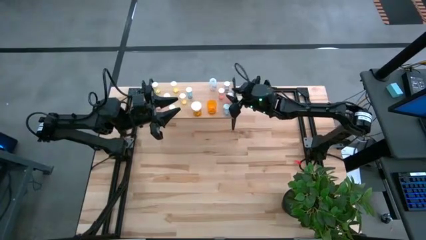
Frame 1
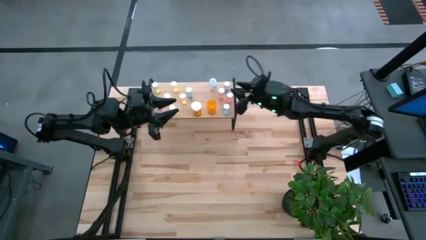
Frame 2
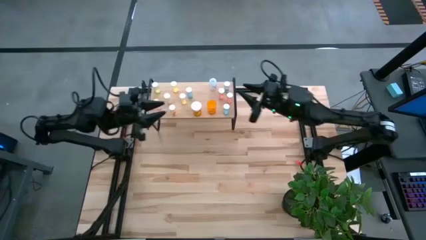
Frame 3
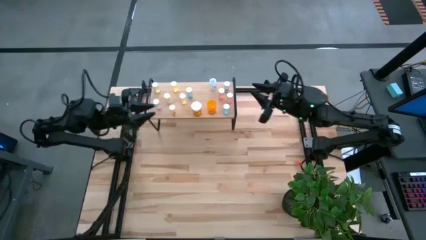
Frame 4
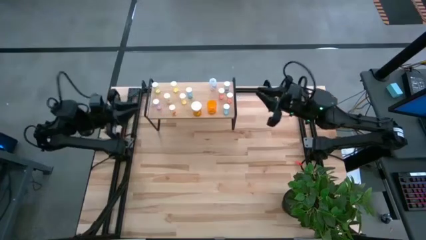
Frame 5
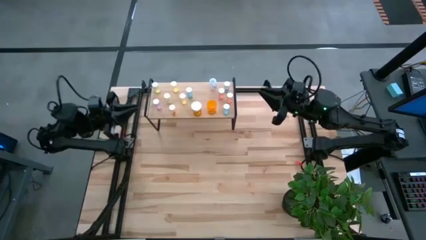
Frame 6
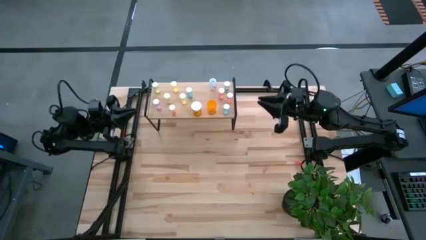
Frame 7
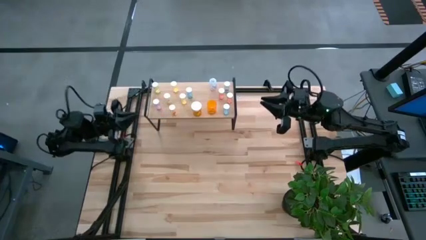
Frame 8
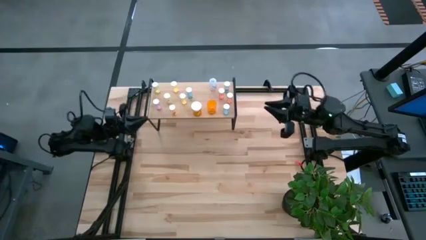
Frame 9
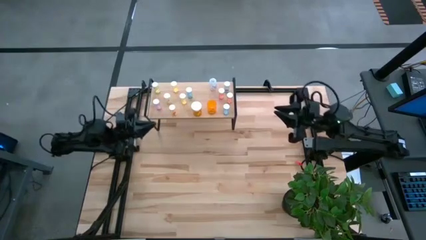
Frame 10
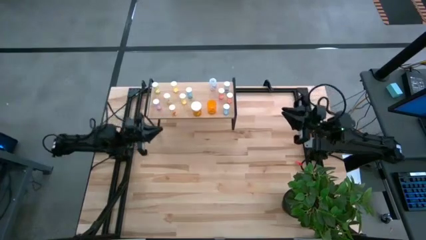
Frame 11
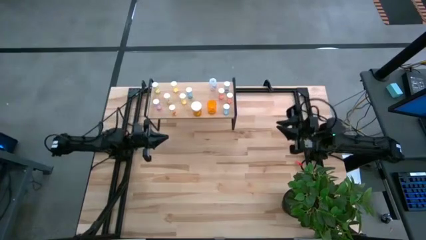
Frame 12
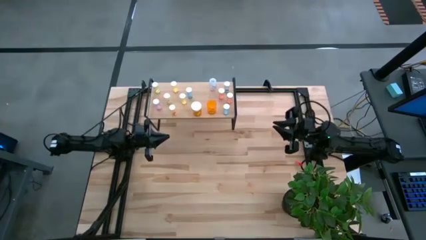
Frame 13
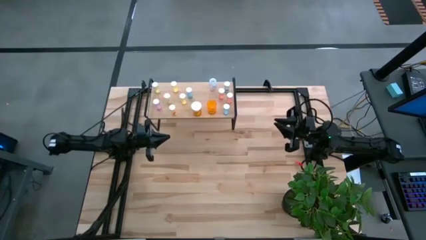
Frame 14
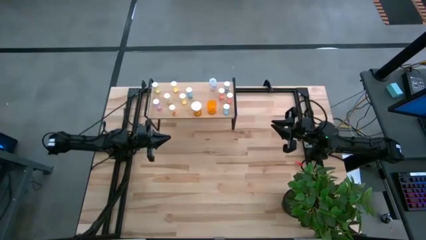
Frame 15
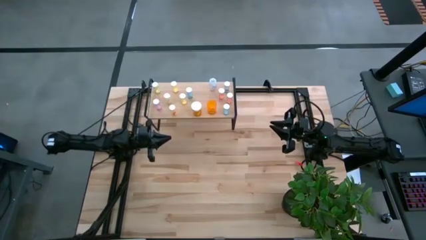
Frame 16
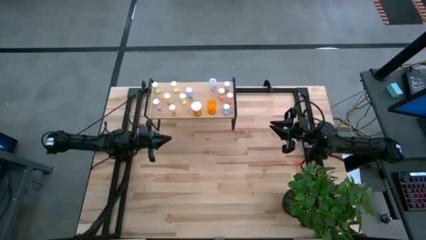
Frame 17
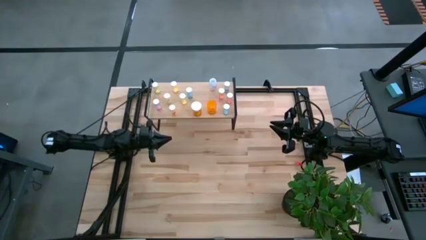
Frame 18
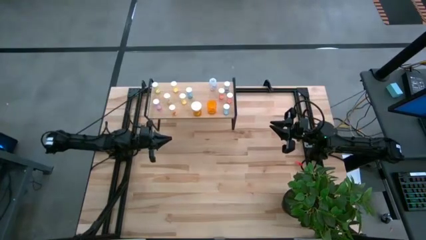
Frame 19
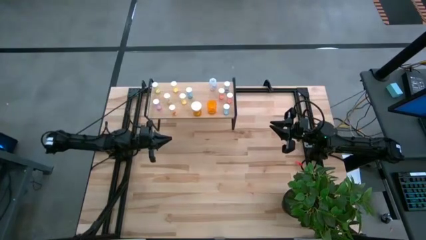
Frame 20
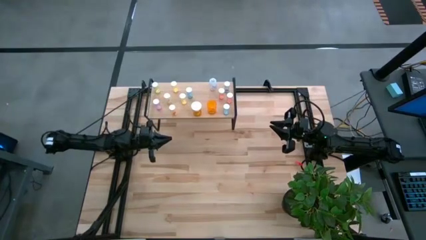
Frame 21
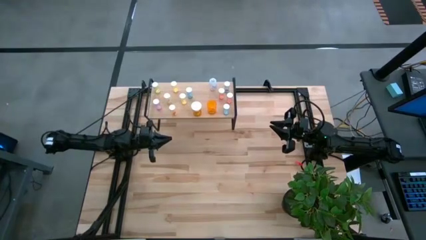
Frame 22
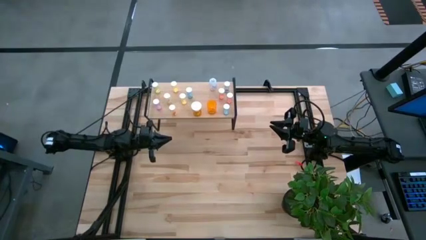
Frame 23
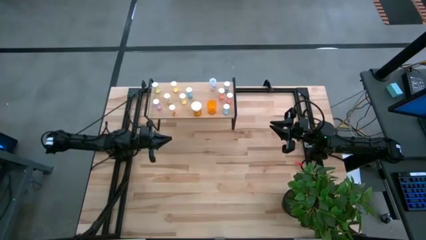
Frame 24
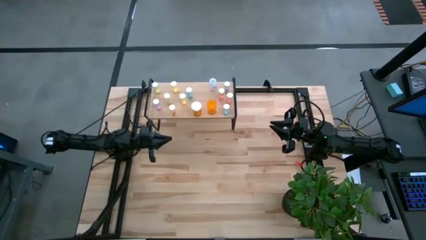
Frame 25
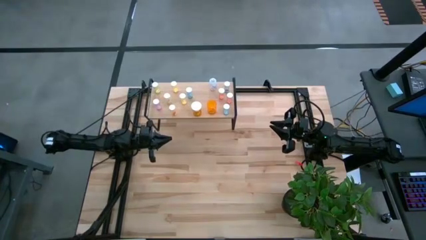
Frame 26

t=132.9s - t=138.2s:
Task: Pick and place medicine bottles onto shelf by color
Return to Home Position

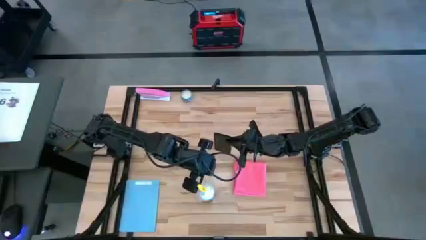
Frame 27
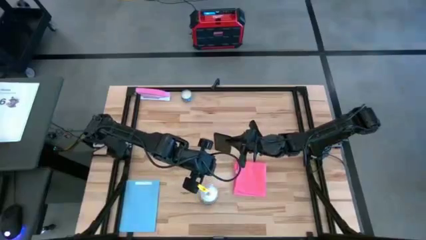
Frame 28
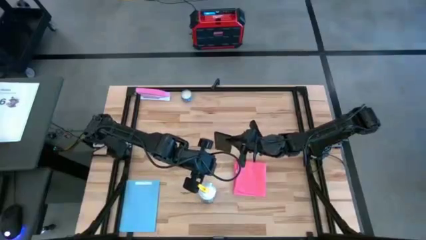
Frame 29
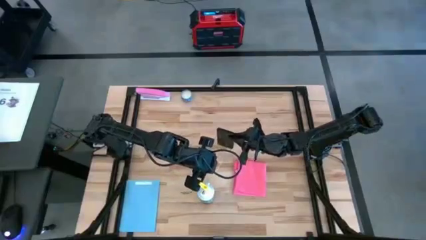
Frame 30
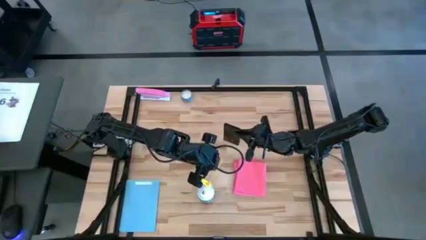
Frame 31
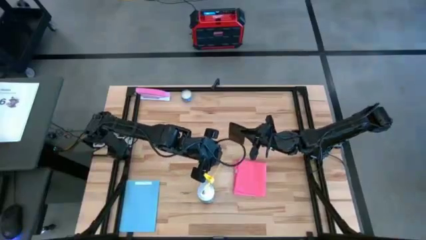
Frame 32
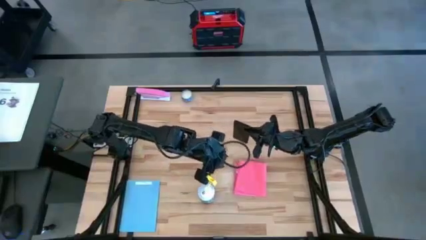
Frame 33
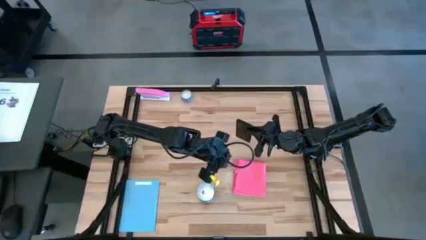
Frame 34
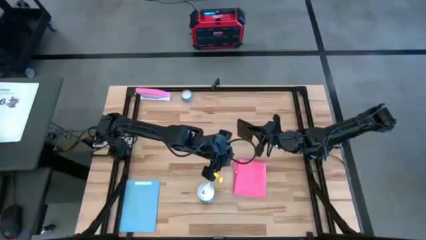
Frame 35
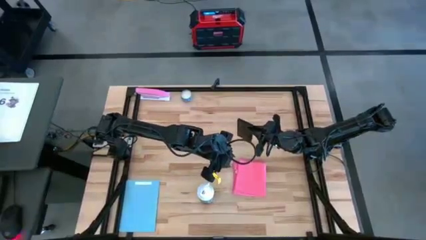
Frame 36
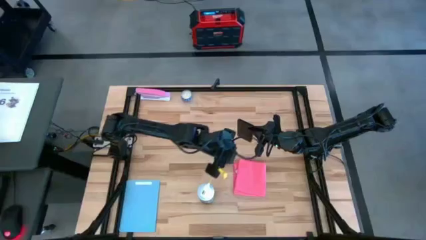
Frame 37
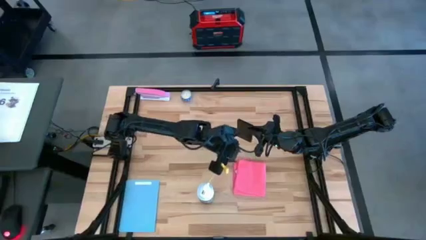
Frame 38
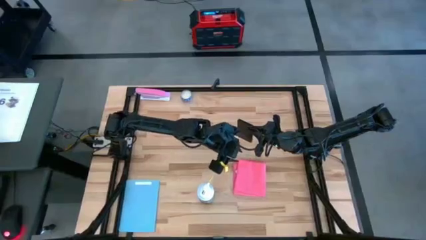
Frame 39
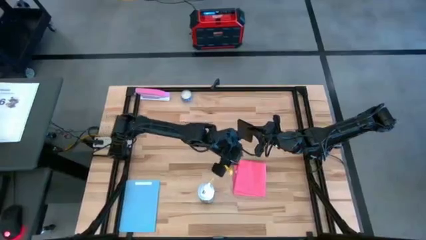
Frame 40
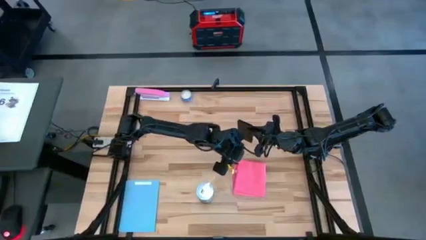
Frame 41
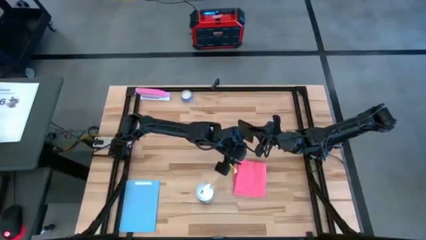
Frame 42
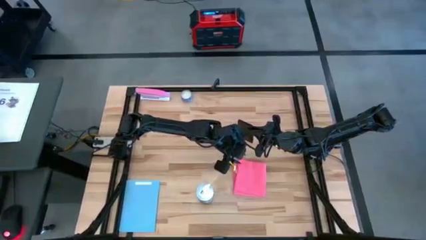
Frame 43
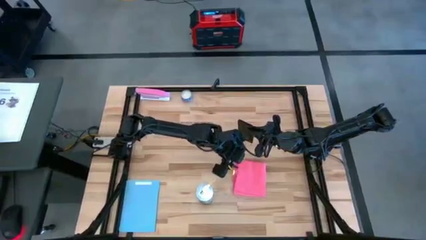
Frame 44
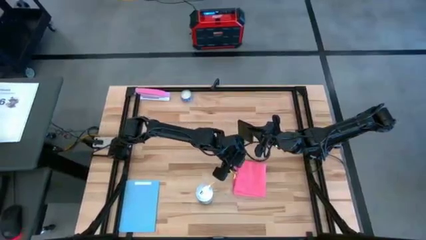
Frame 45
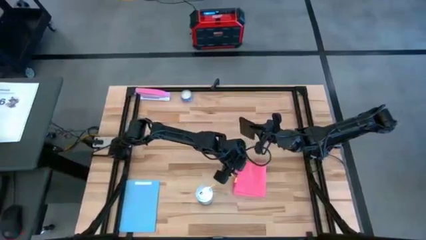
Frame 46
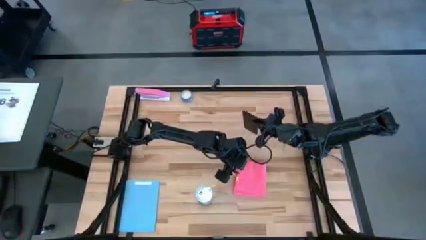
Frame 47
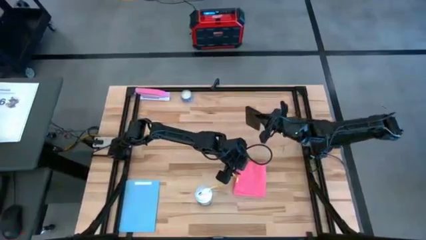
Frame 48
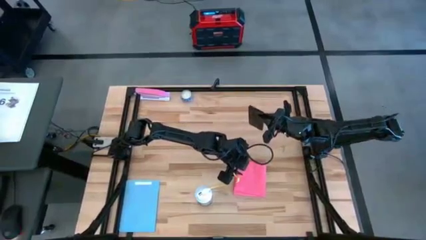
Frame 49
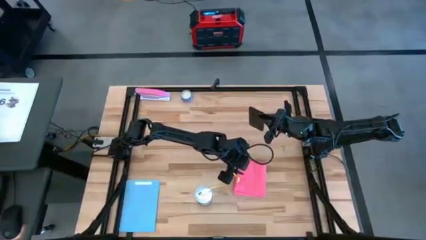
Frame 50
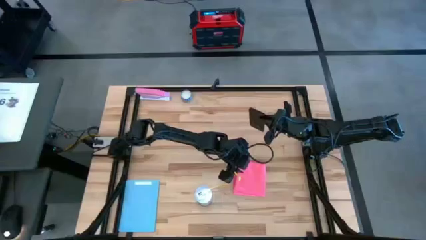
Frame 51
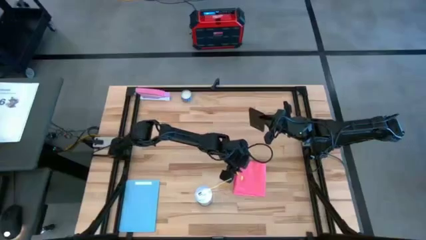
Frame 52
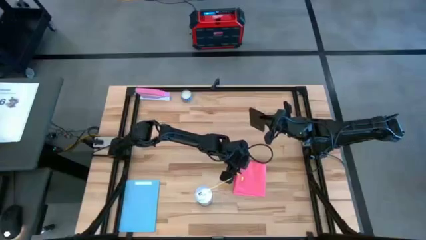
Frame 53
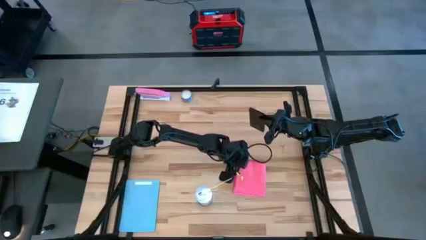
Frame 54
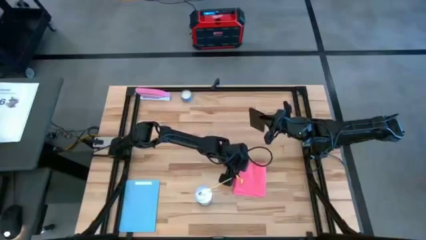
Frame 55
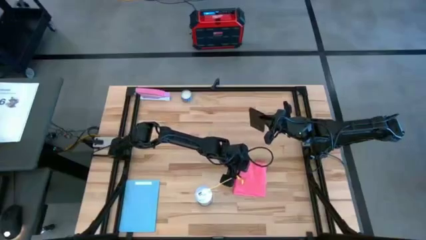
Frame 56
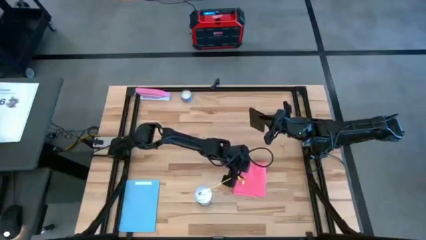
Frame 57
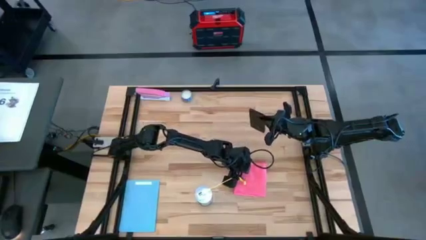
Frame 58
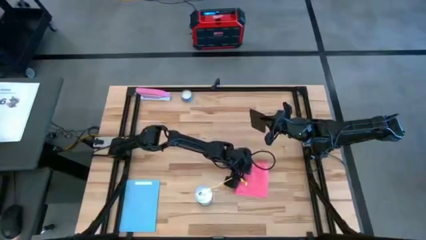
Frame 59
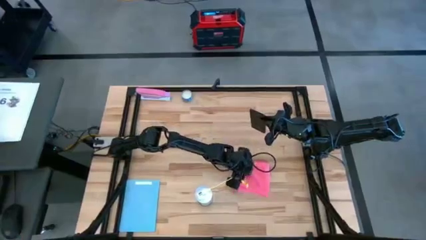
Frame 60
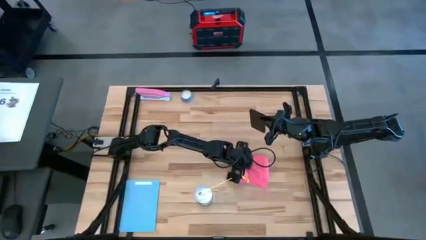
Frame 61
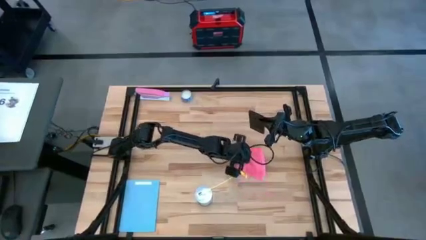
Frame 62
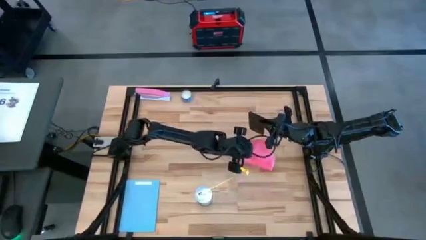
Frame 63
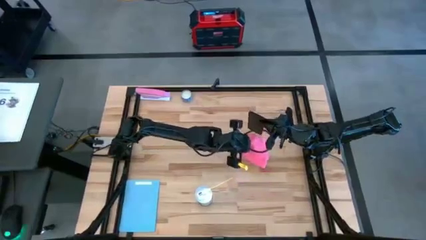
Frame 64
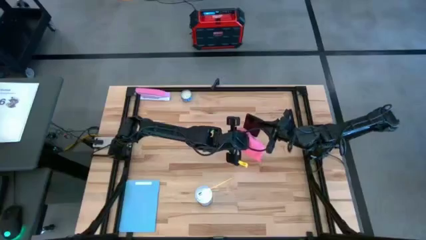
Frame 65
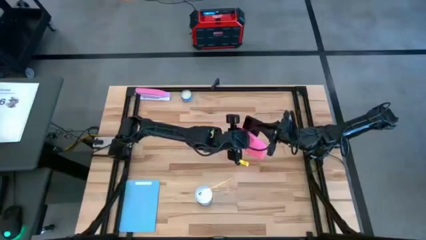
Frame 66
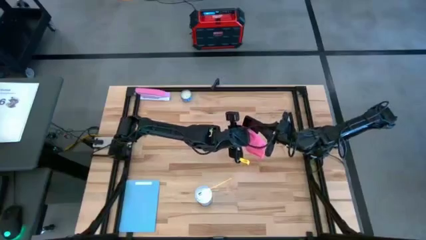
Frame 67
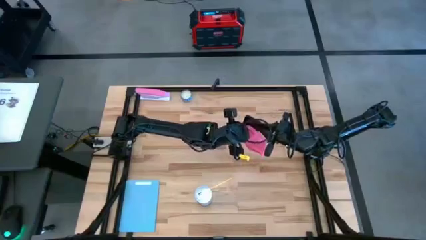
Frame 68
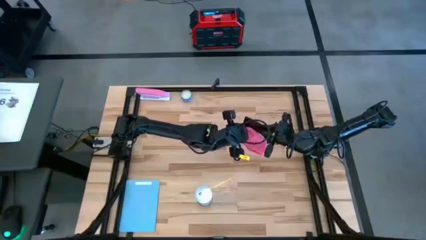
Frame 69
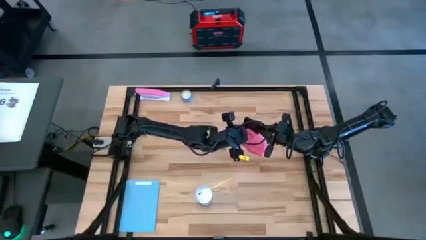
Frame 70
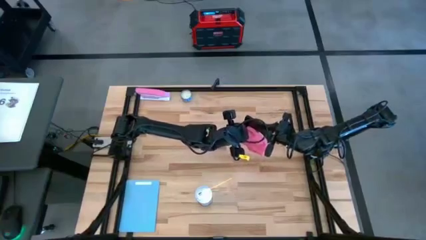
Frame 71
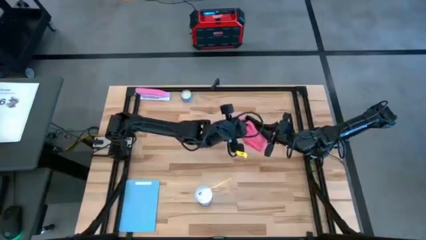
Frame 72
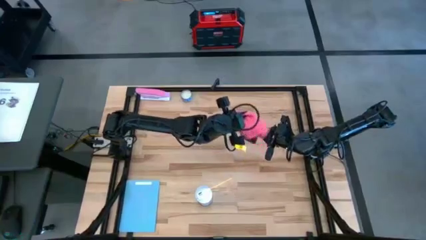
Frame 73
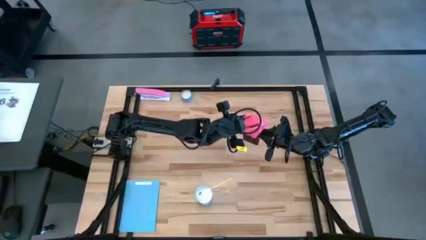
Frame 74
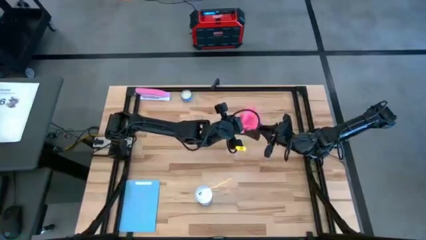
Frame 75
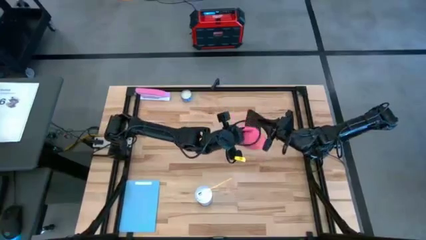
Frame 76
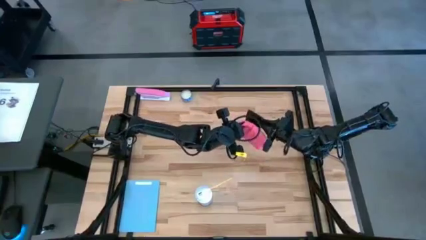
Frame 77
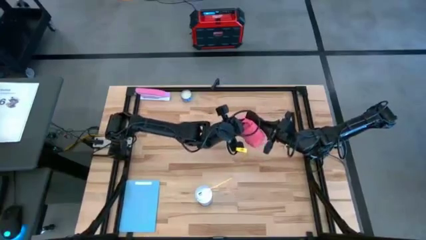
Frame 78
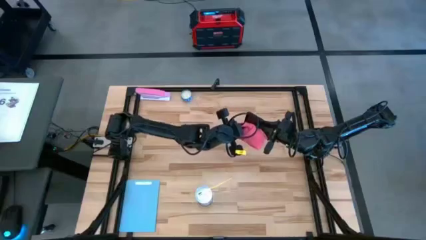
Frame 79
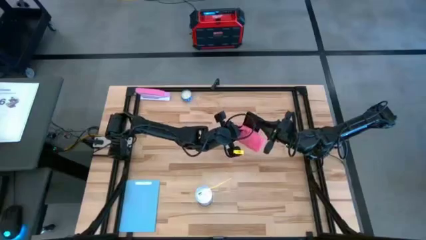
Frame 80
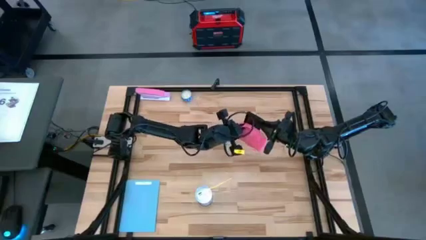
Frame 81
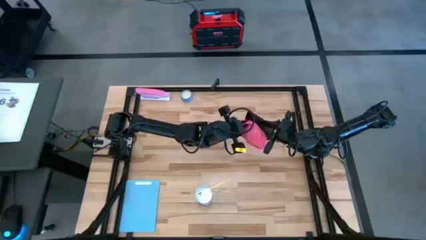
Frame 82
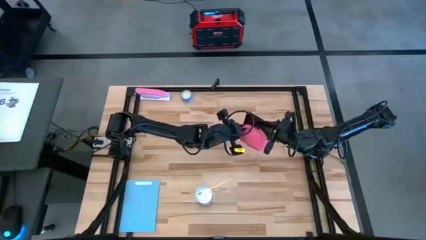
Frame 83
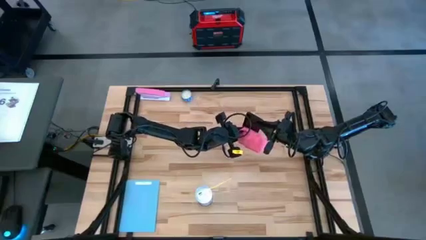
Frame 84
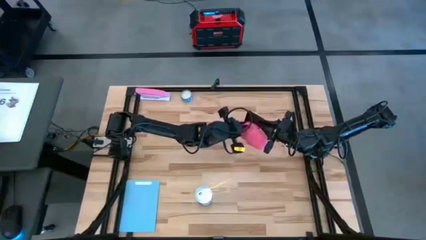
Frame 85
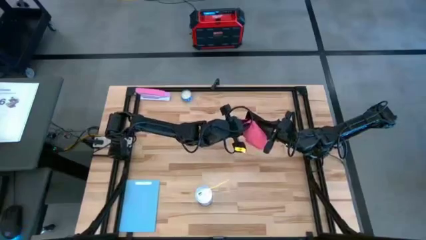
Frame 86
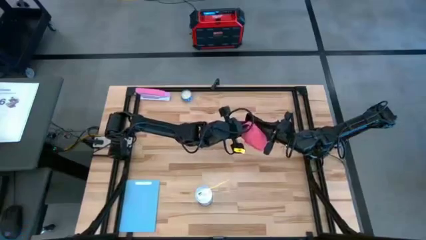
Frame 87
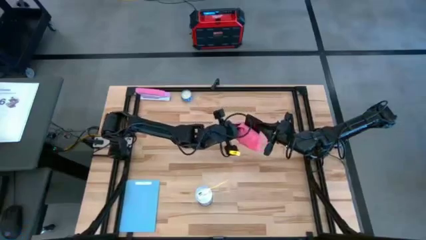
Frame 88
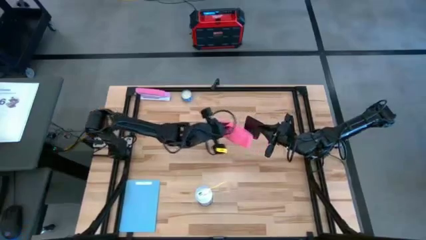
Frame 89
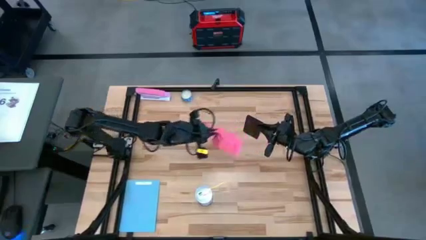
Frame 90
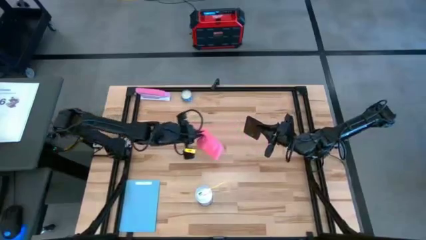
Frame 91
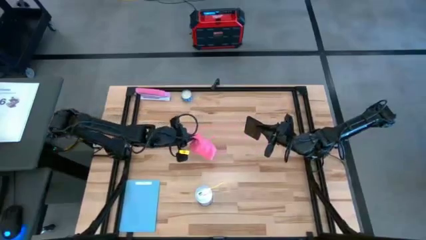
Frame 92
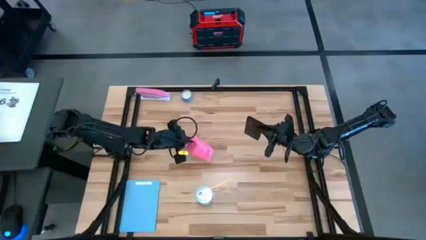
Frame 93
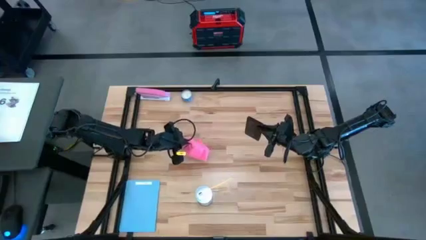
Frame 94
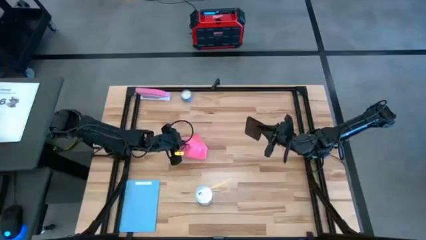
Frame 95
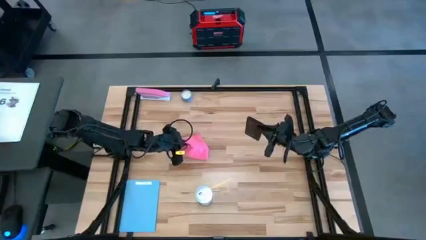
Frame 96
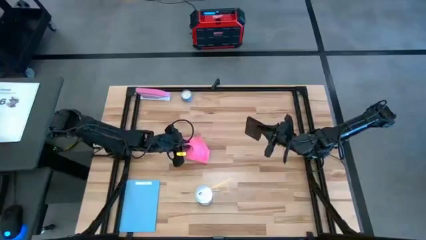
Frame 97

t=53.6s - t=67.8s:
Task: Apply microfiber cloth
Wipe the back of the black cellphone with the pink microfiber cloth
